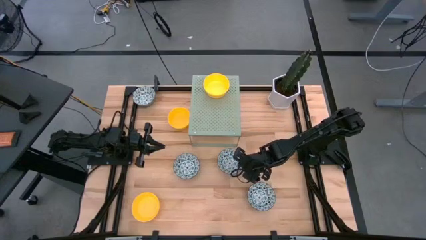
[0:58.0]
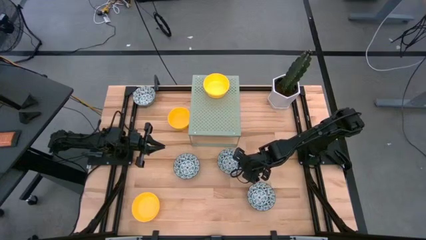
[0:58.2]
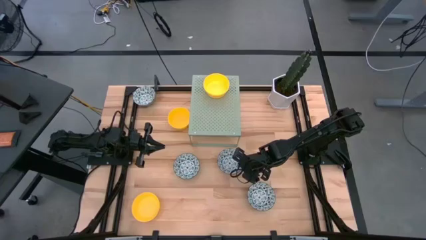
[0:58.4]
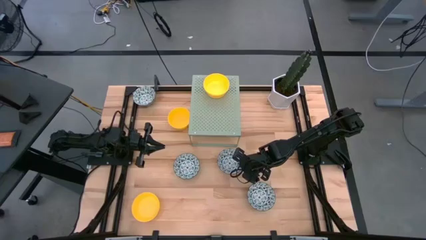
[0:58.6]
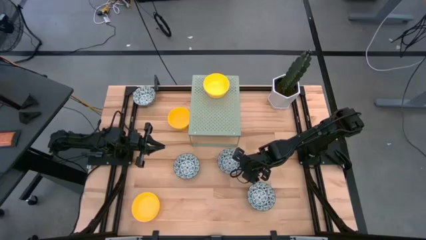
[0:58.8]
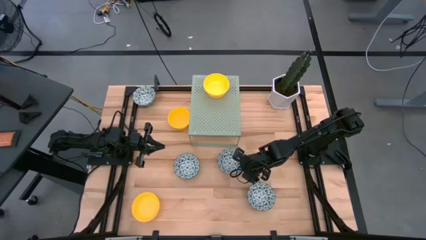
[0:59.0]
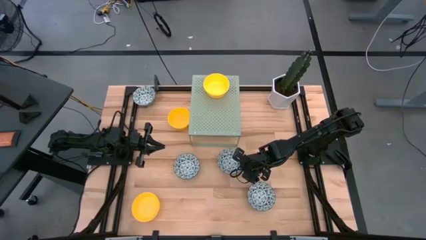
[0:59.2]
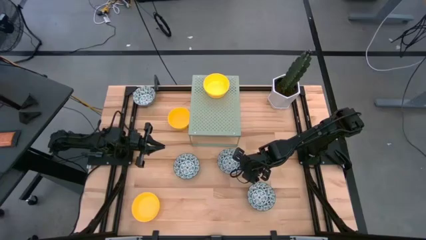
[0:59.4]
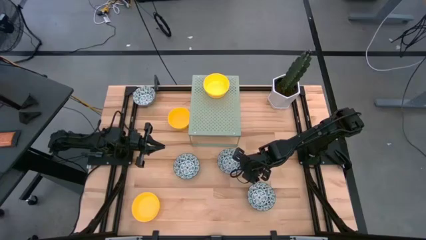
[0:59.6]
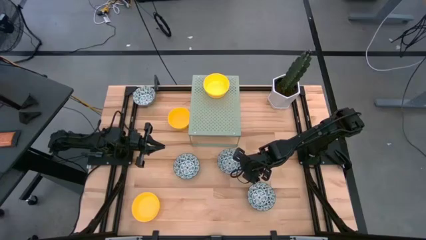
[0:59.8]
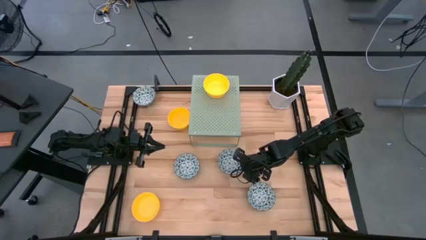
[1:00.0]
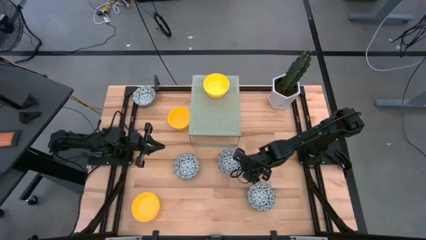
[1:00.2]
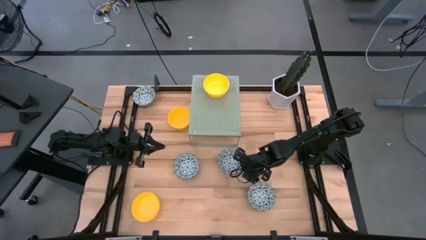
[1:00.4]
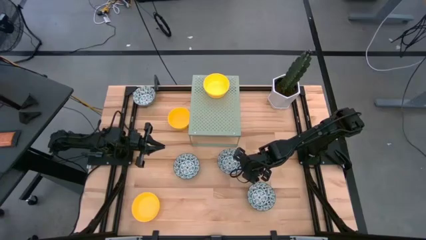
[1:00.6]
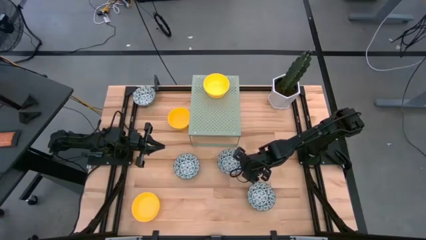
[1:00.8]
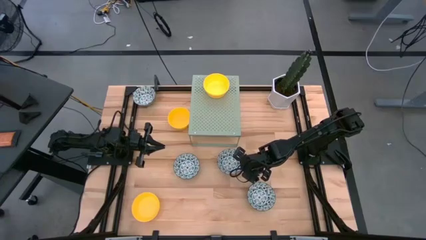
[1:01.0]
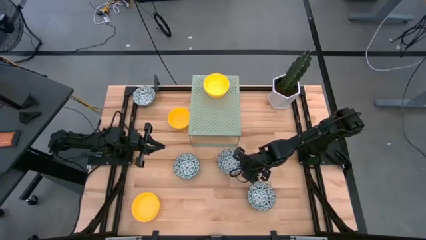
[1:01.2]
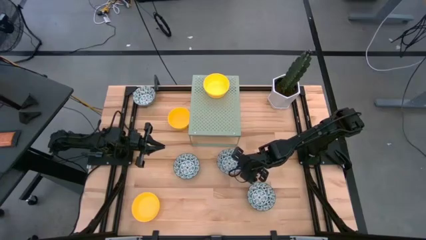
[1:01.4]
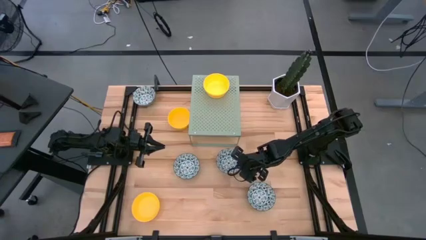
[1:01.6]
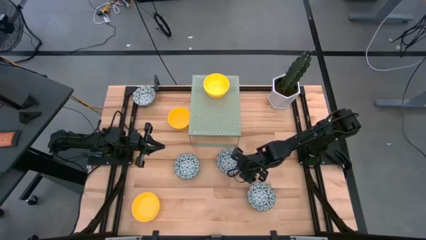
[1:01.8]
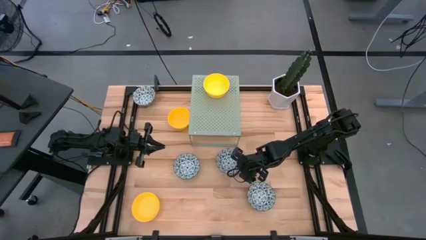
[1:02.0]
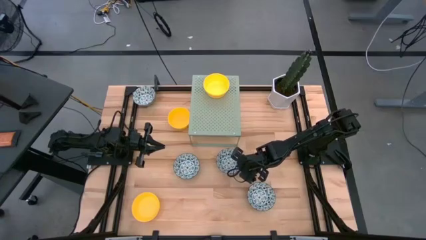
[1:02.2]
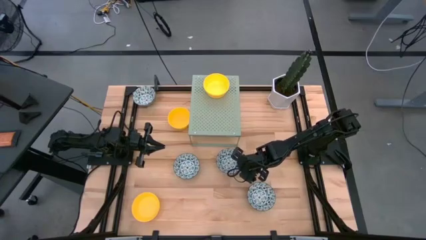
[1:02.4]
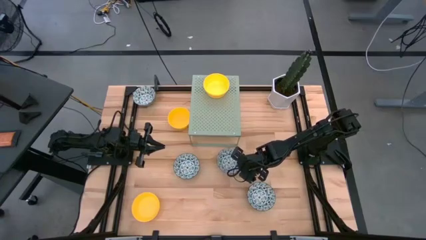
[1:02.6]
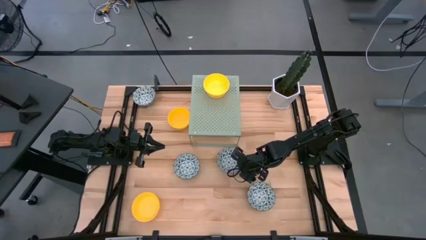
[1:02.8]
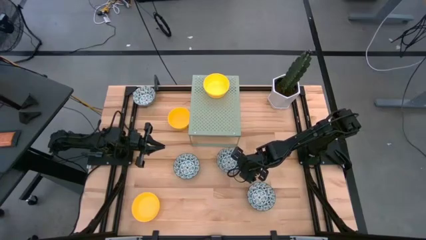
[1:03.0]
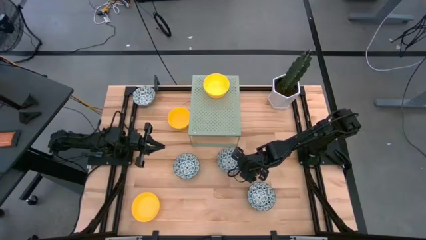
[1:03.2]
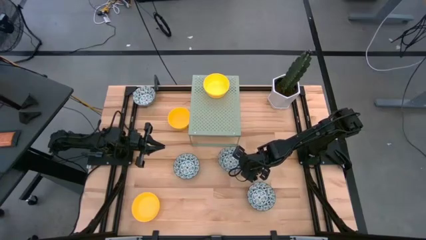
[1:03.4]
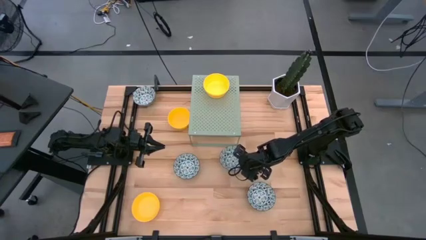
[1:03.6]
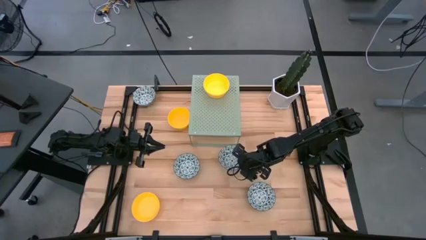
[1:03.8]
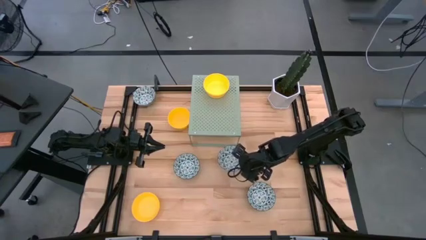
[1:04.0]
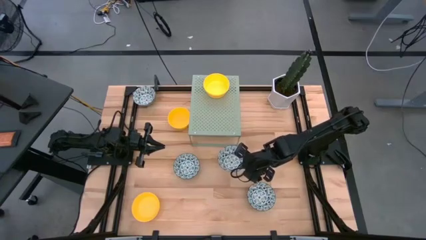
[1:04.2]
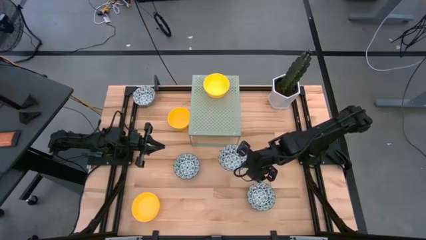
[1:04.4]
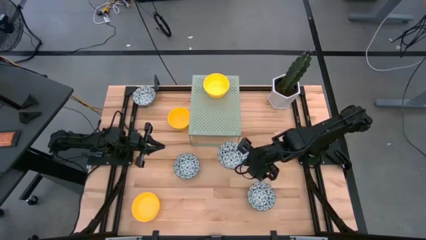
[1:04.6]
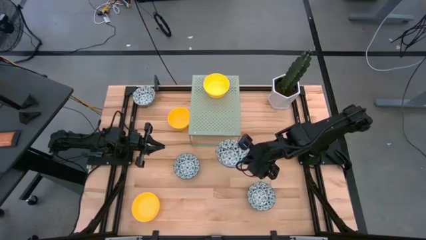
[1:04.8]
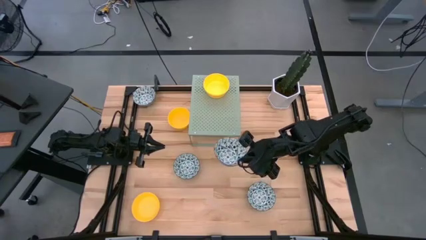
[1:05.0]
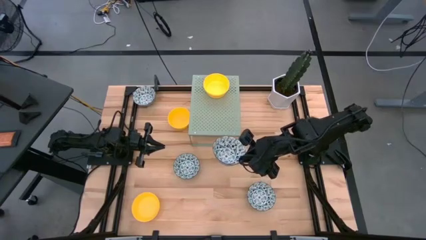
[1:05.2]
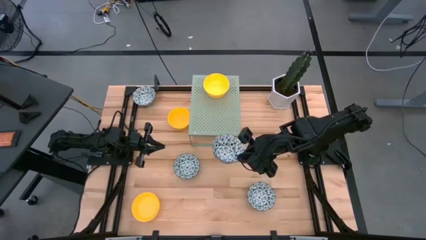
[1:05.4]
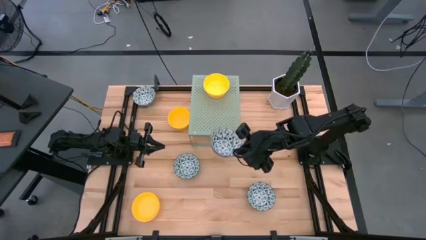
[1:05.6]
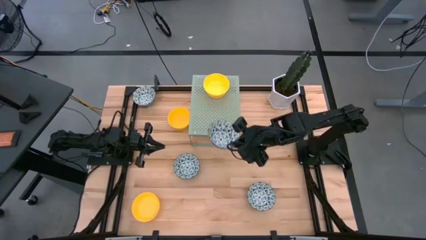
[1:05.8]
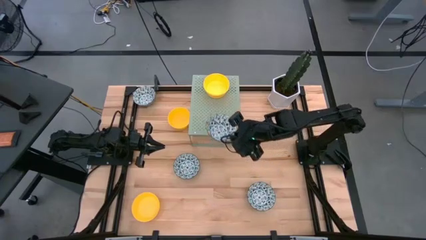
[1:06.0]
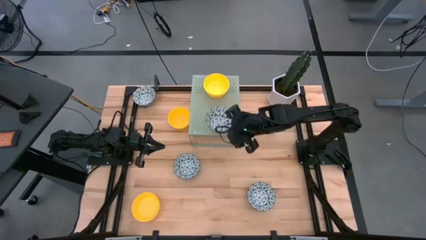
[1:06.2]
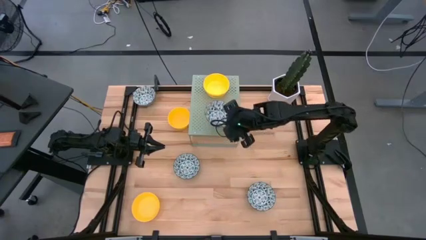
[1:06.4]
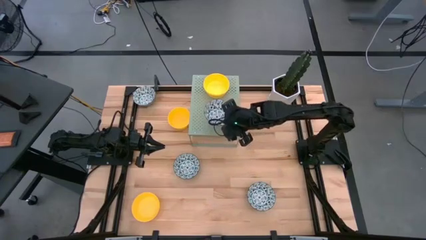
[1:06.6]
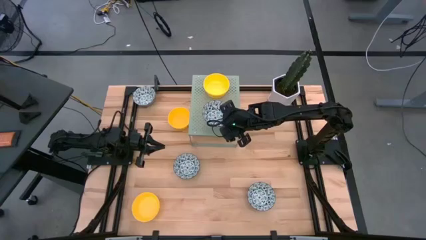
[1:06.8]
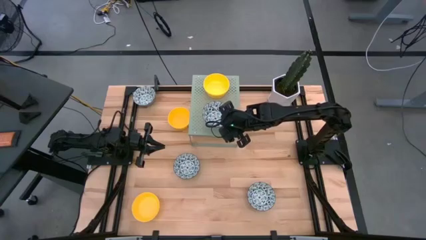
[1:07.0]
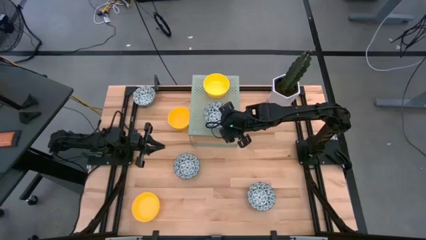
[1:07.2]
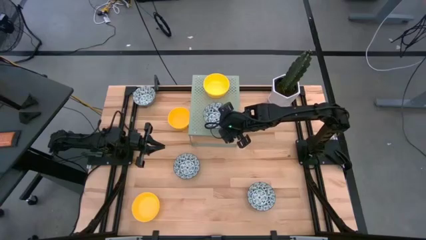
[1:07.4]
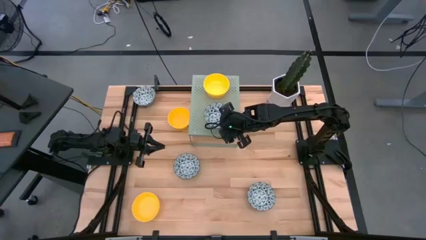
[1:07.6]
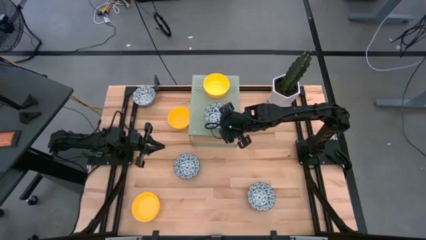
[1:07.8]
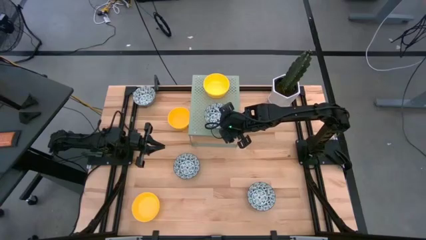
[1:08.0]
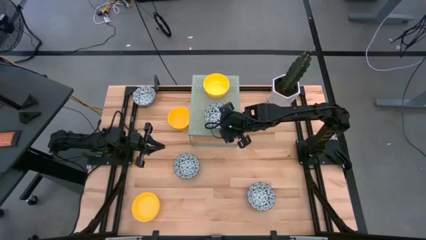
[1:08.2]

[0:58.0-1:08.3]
Task: Pick & Place Mini bowls
Put the blue and white bowl on the shelf
